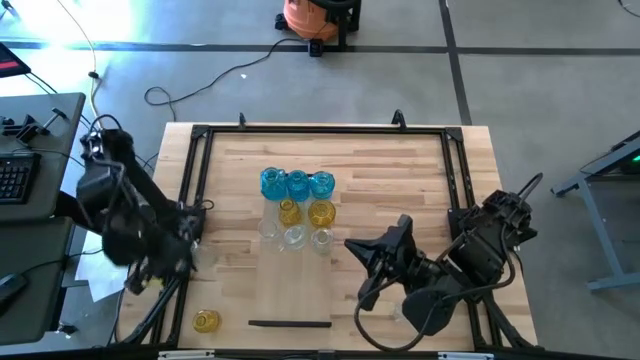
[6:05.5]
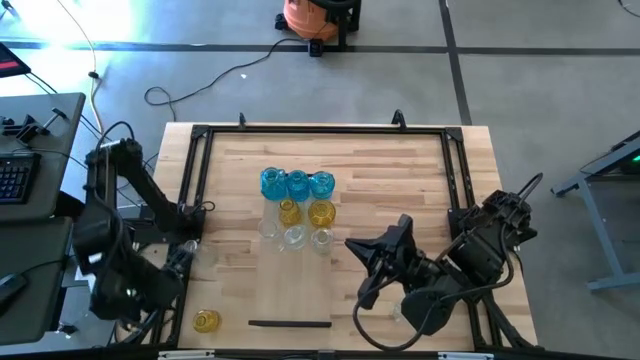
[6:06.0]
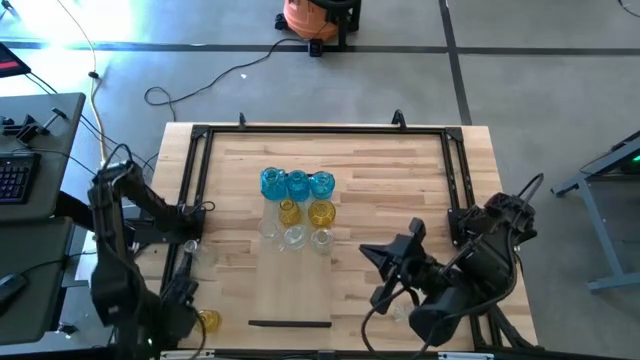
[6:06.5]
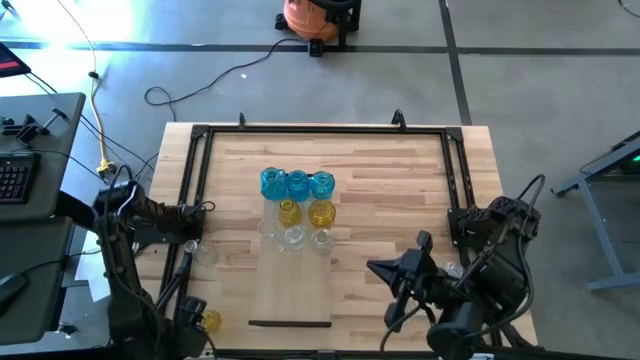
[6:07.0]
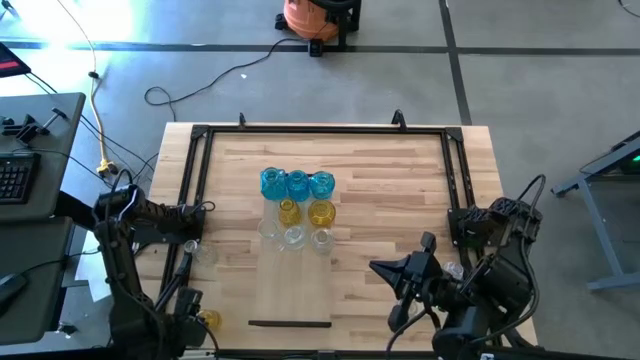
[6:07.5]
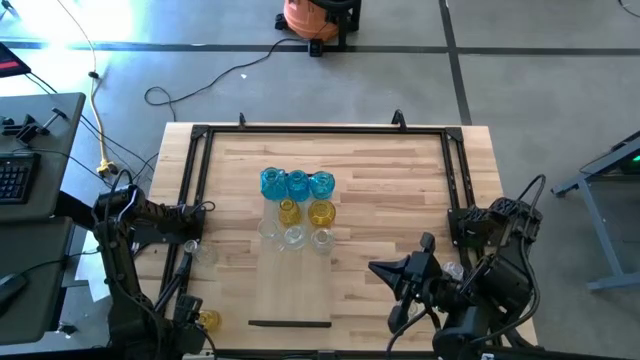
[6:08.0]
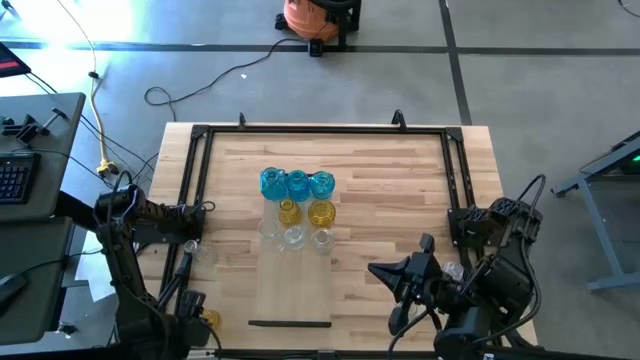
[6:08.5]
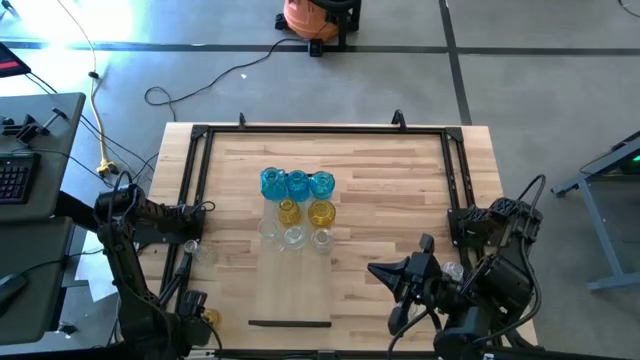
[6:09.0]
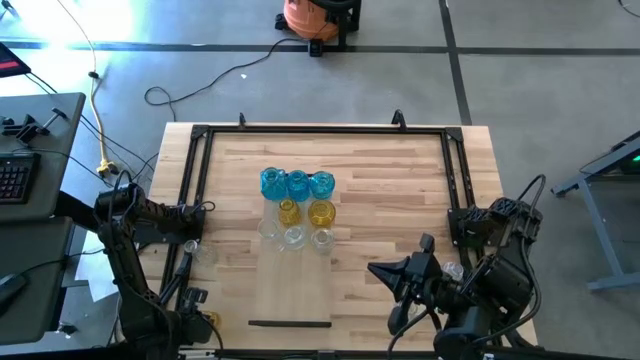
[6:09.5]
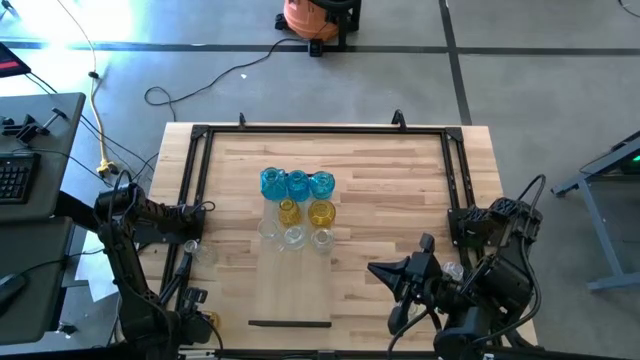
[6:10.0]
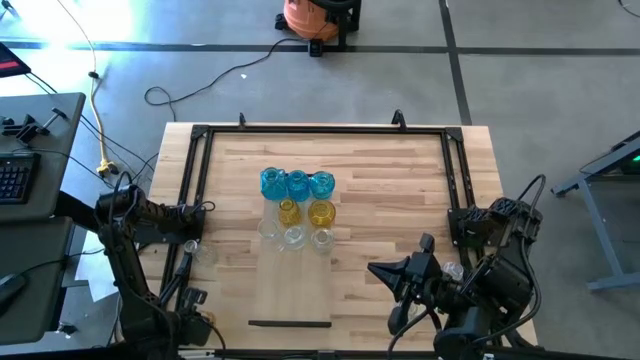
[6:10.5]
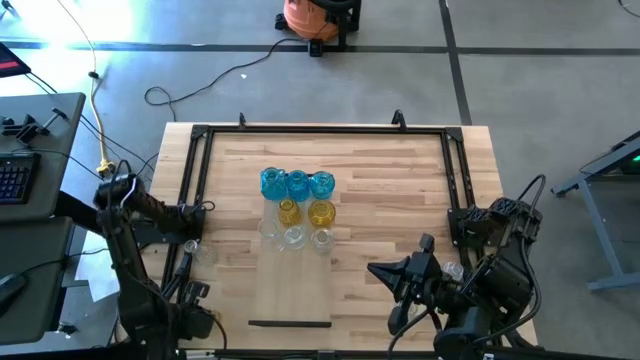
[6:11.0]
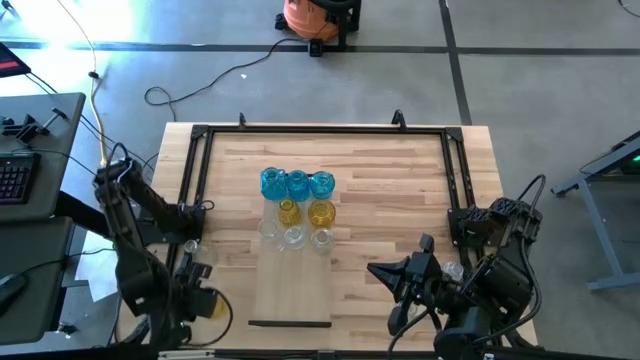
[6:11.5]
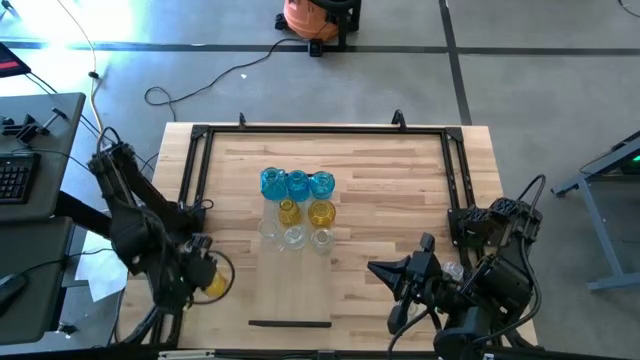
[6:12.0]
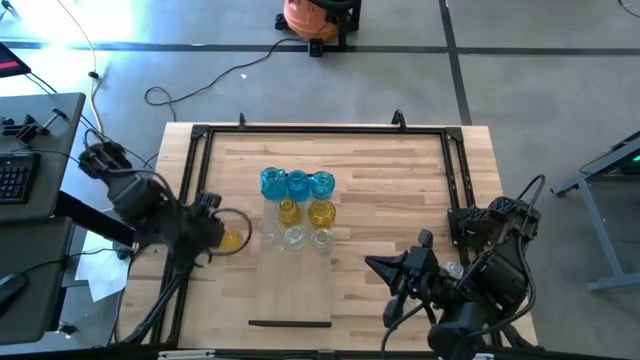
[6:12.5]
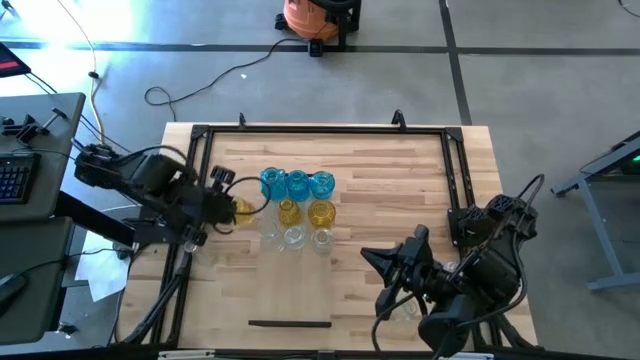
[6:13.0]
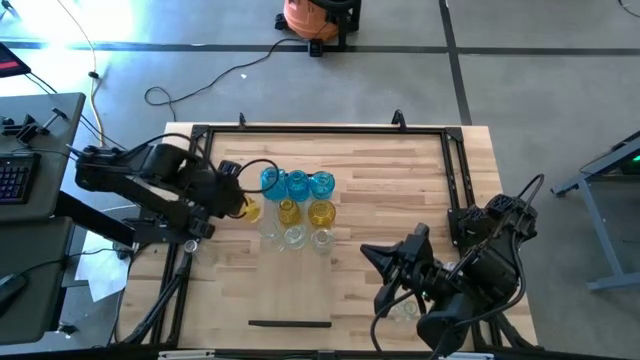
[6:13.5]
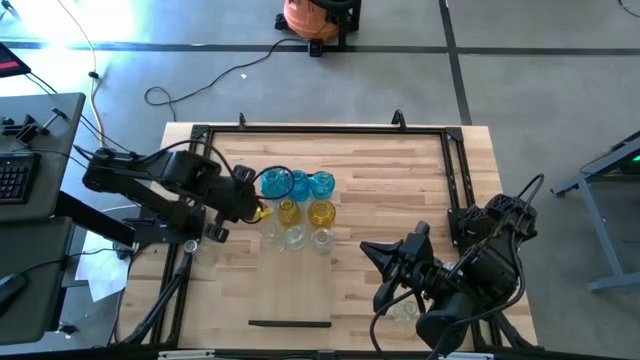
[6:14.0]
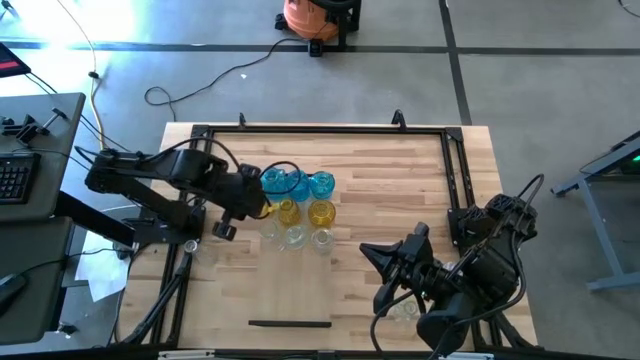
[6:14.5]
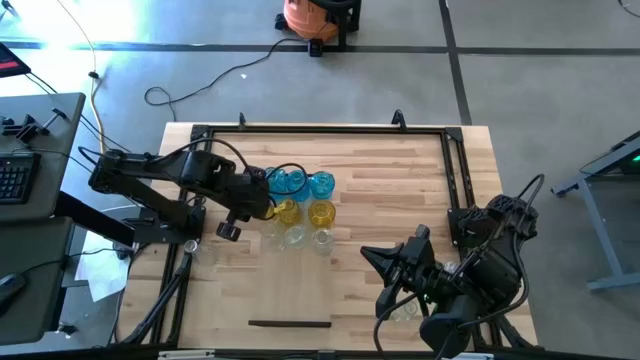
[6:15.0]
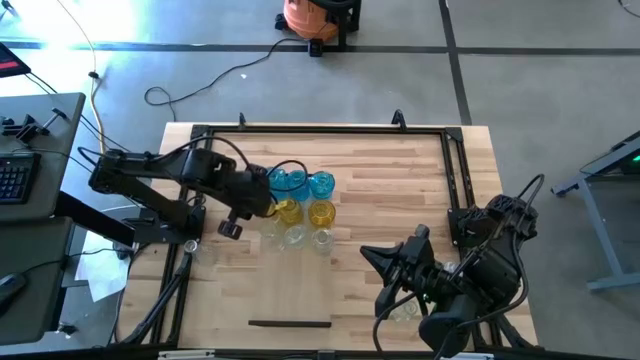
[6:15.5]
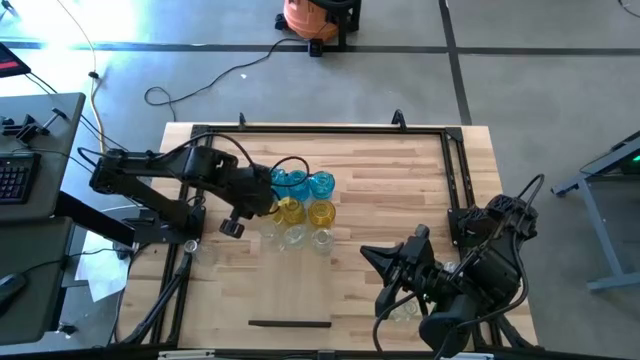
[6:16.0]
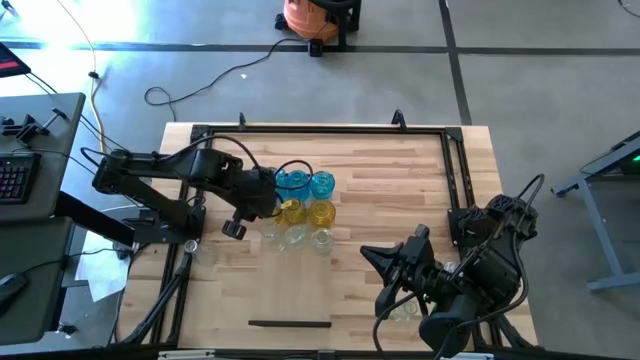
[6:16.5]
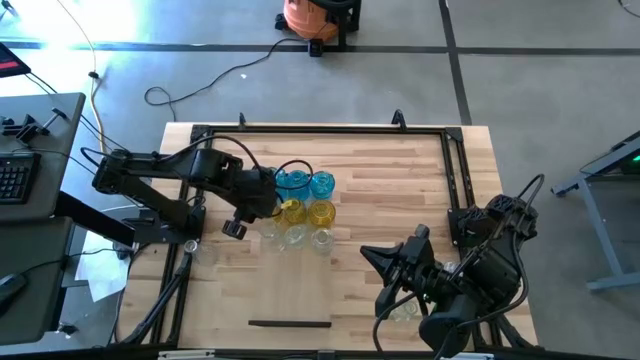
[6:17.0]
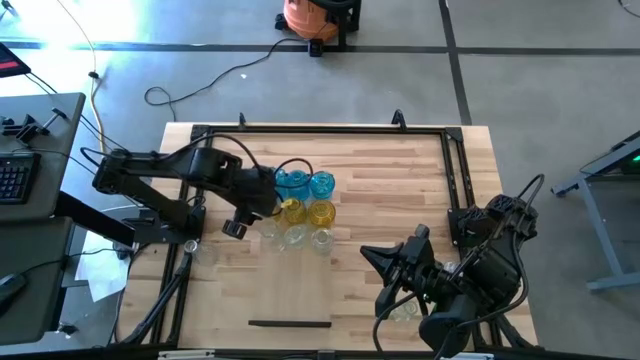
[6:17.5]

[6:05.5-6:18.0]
Task: sort vases onto shelf
Put the yellow vase on the shelf to align with the other yellow vases

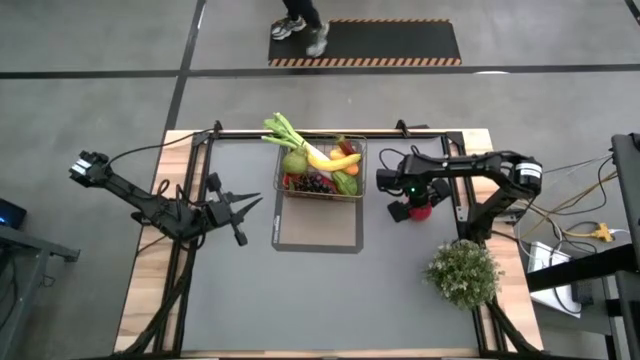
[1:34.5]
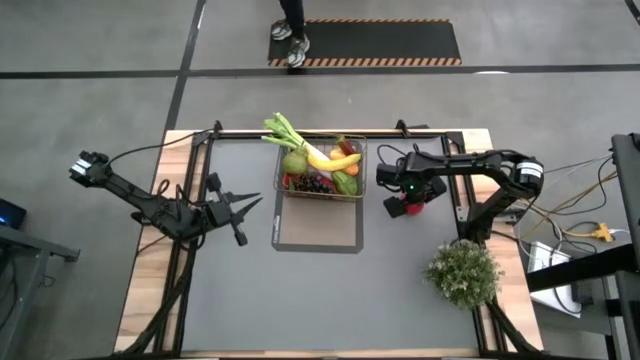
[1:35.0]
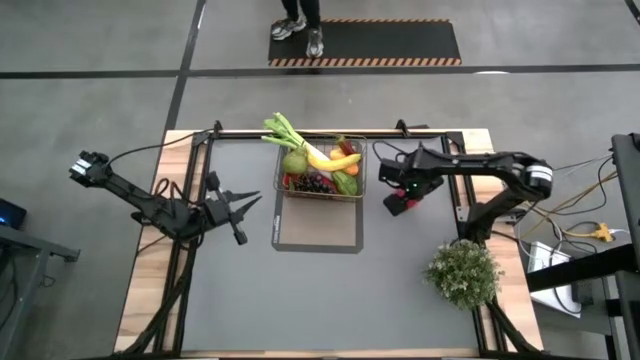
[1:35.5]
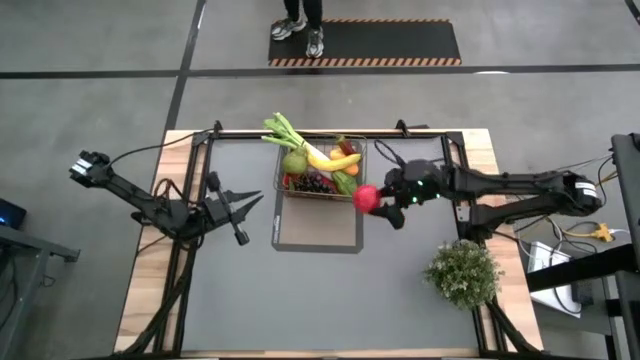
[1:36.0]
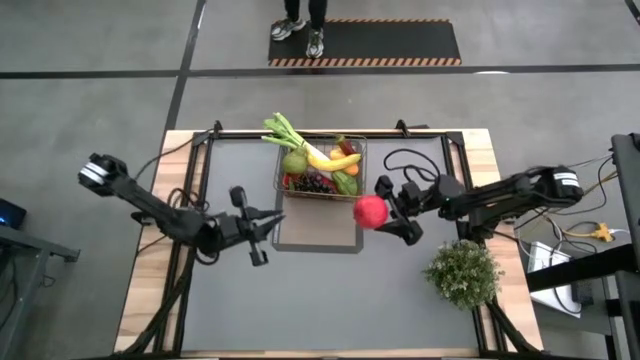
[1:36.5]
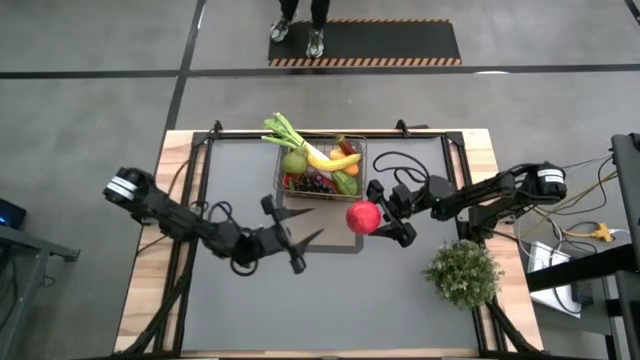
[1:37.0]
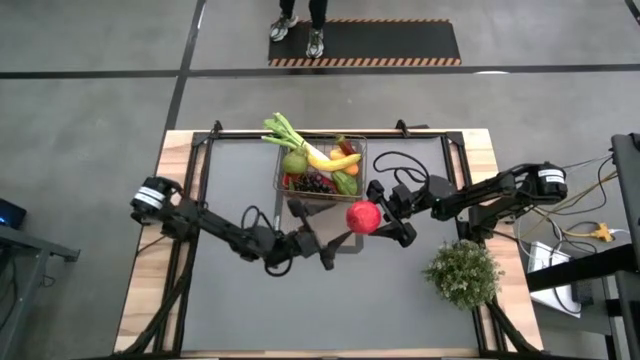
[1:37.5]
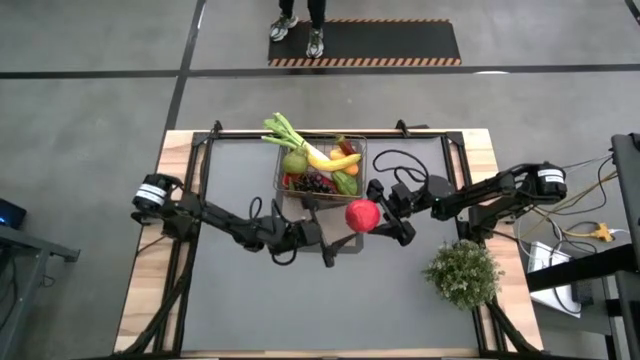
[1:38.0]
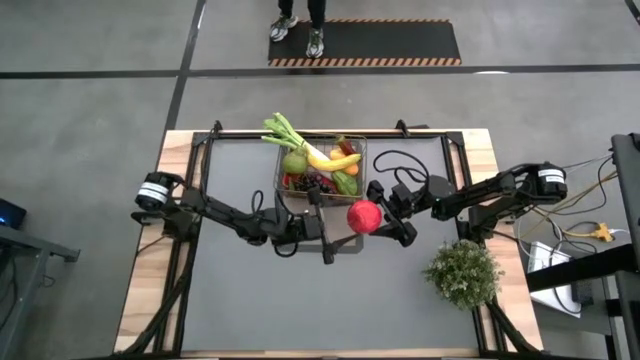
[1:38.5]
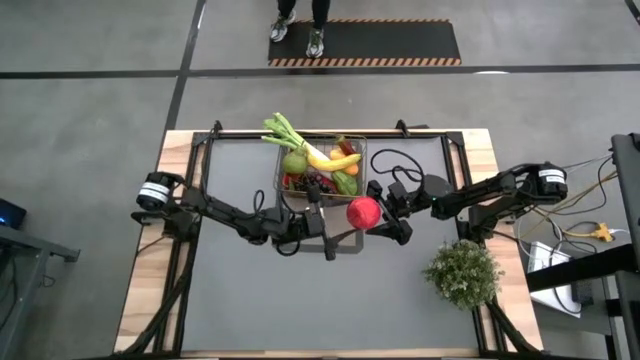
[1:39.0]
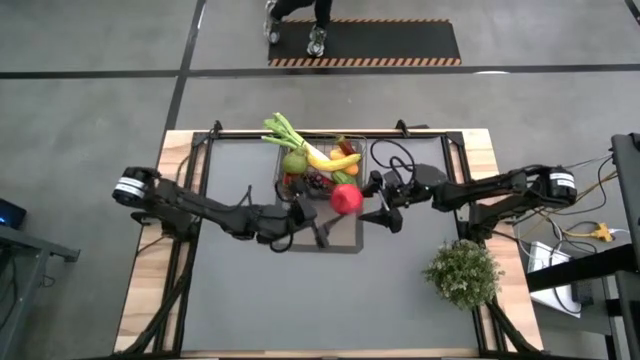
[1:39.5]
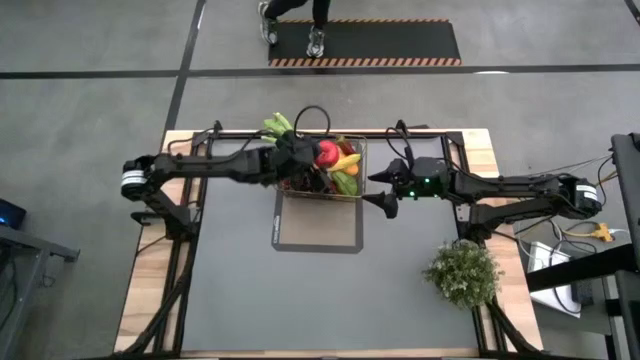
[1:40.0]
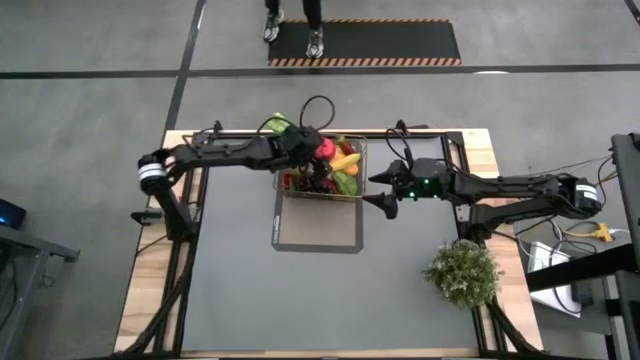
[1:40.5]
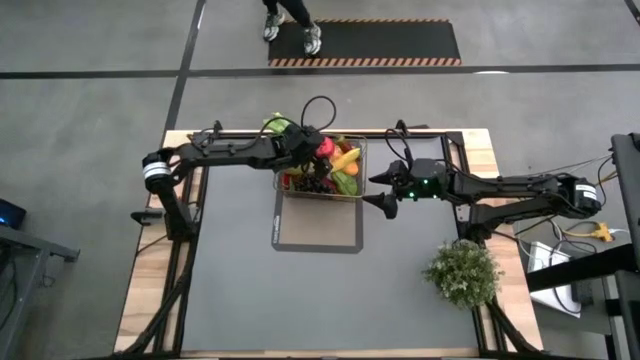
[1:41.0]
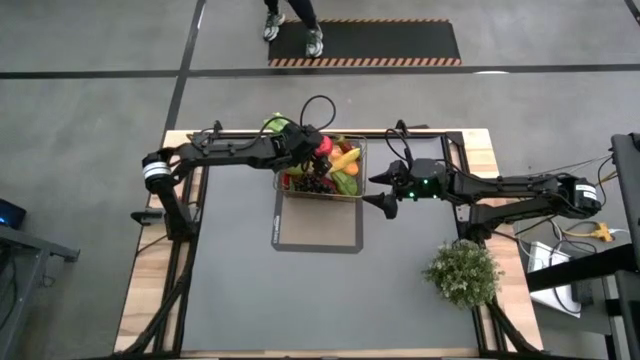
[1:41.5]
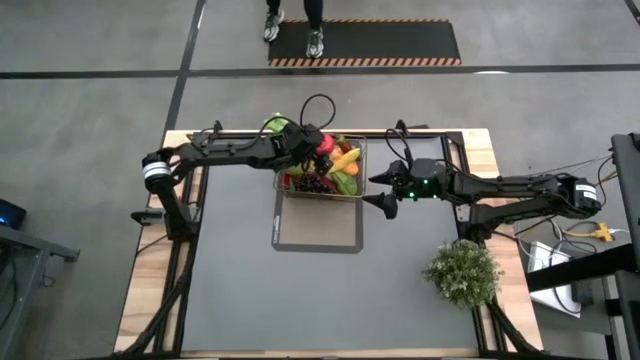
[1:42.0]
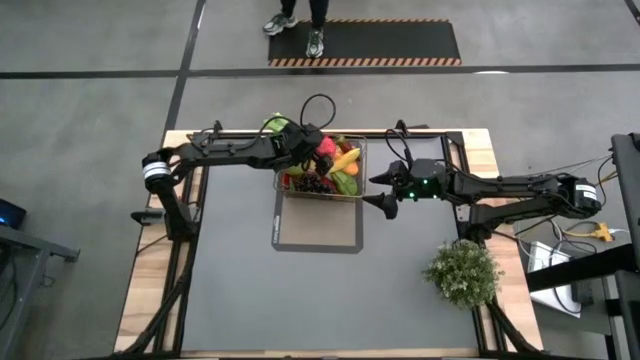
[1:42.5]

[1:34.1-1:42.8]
Task: Build produce basket
Put the apple into the wire basket

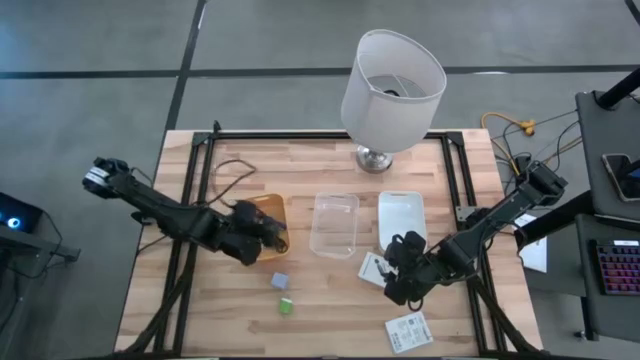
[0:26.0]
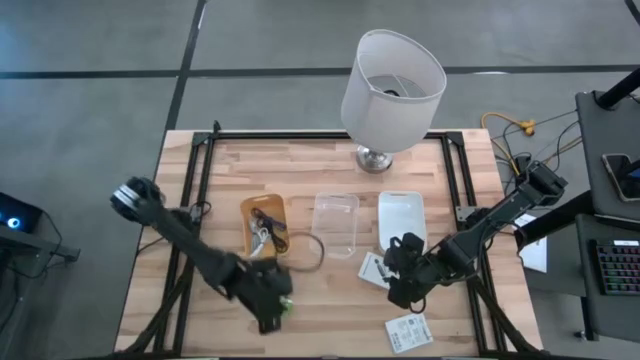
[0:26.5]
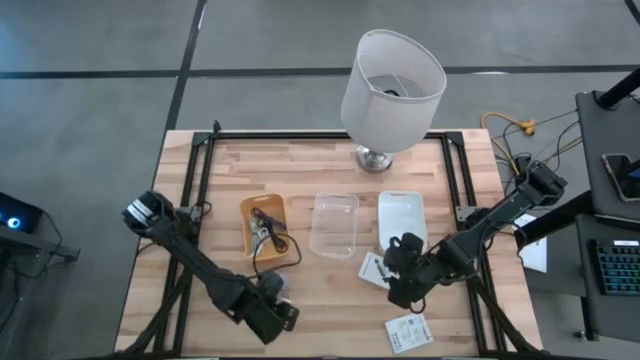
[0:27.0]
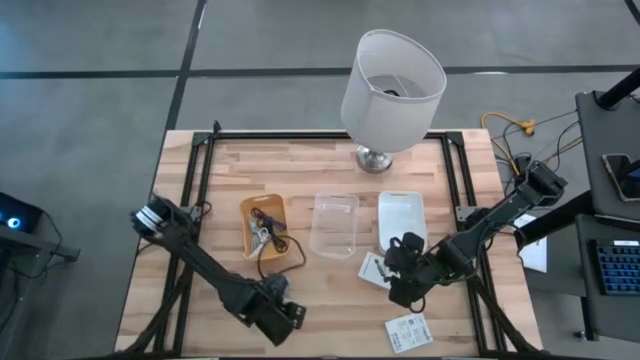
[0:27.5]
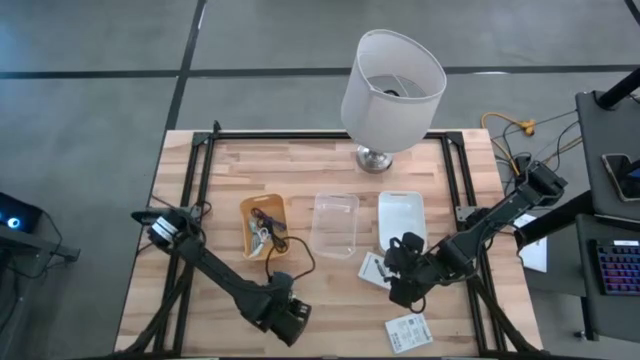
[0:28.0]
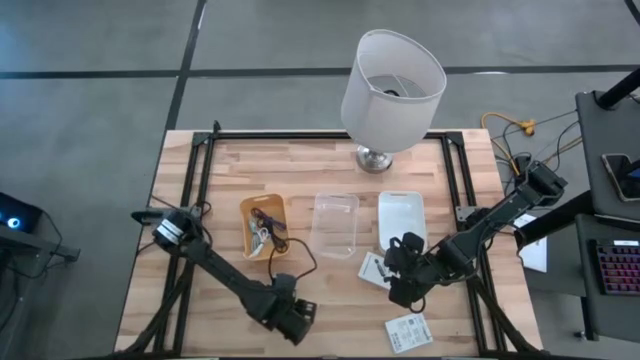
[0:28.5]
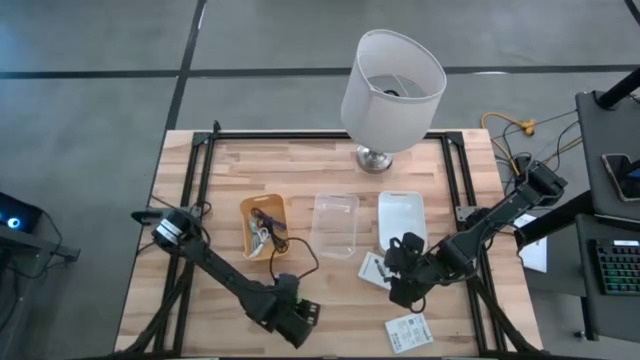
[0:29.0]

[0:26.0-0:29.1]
Task: Pick and place items into bin
Put the green charger adapter into the transparent bin
